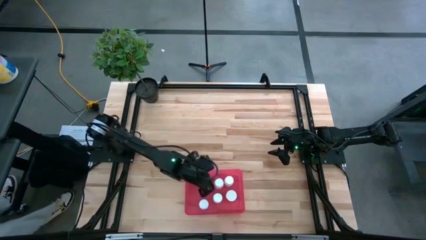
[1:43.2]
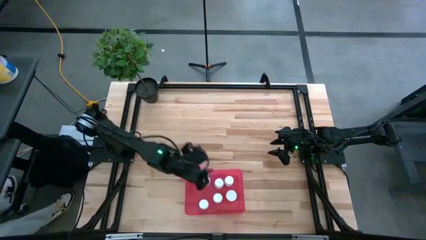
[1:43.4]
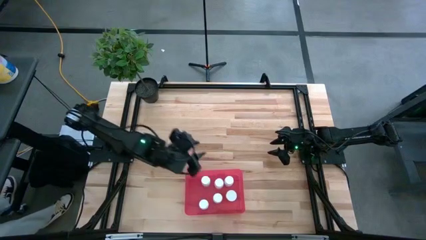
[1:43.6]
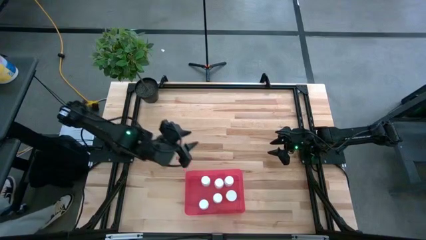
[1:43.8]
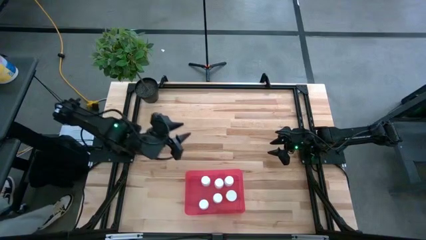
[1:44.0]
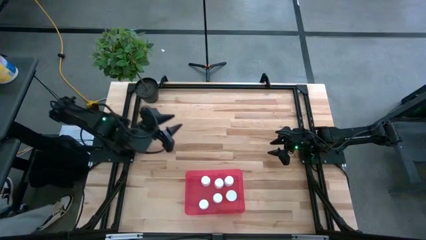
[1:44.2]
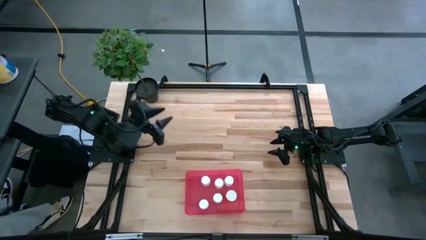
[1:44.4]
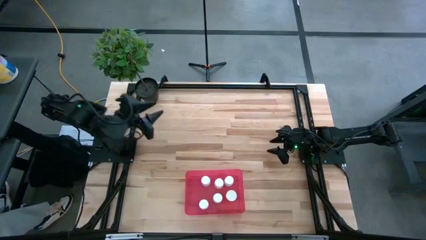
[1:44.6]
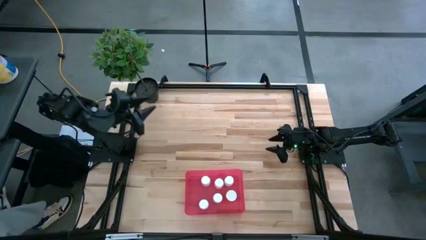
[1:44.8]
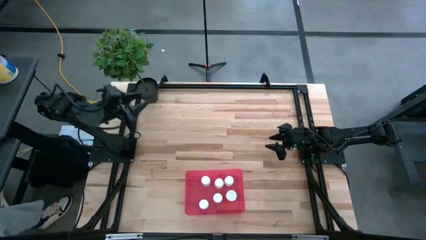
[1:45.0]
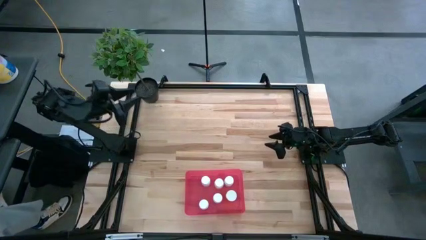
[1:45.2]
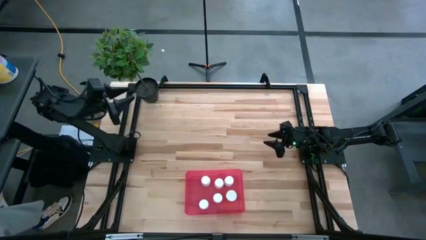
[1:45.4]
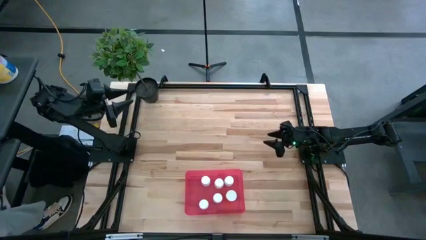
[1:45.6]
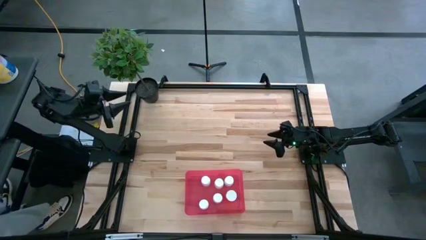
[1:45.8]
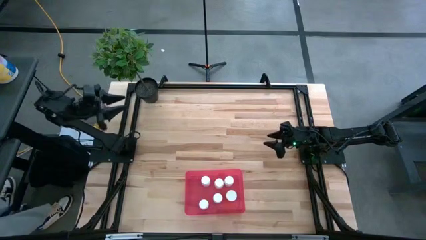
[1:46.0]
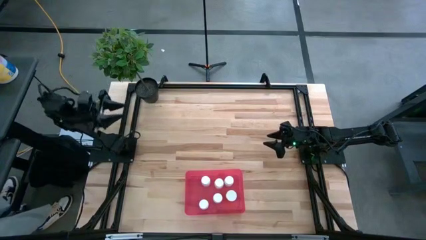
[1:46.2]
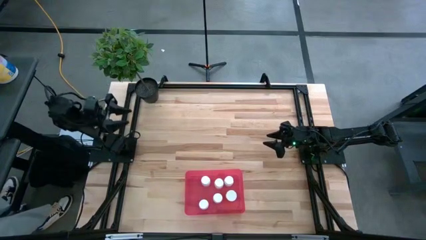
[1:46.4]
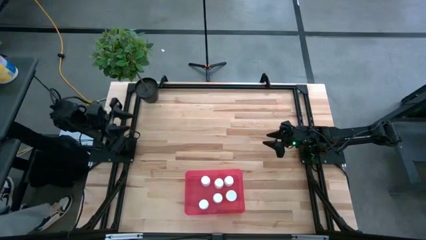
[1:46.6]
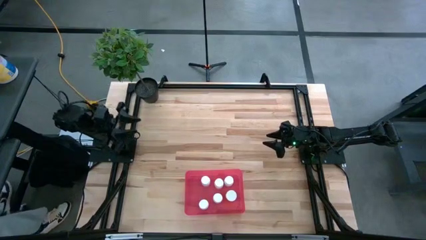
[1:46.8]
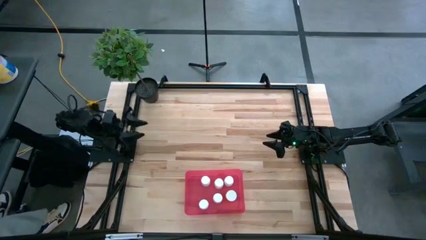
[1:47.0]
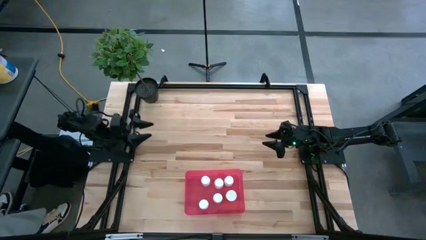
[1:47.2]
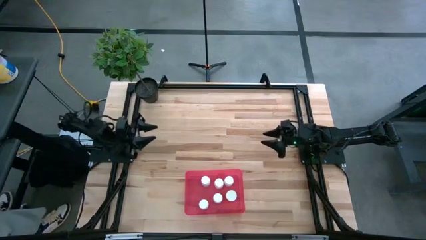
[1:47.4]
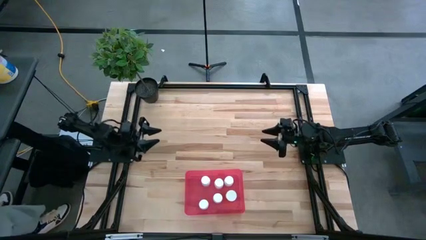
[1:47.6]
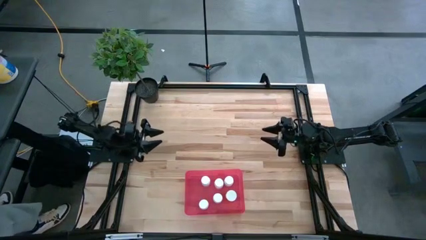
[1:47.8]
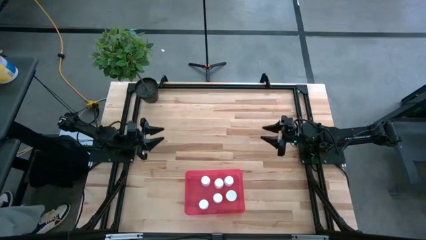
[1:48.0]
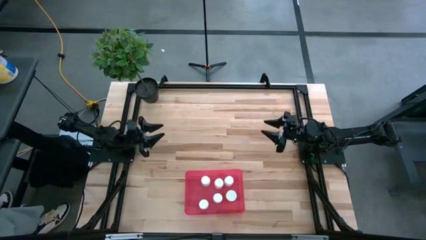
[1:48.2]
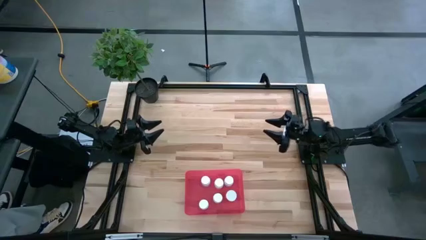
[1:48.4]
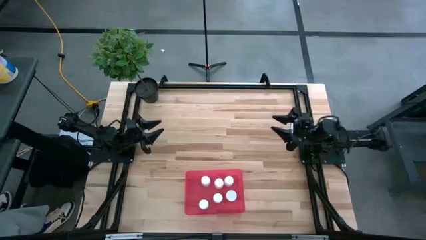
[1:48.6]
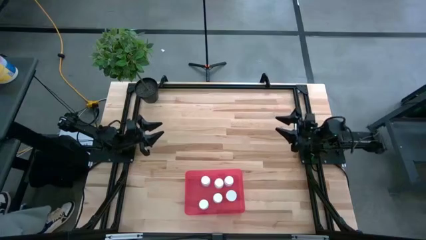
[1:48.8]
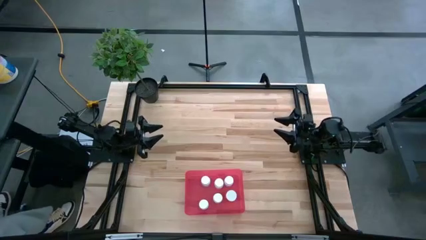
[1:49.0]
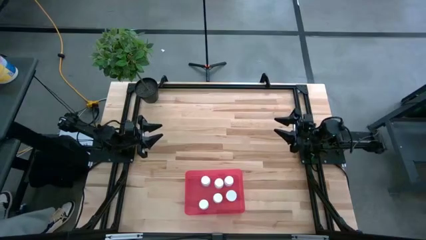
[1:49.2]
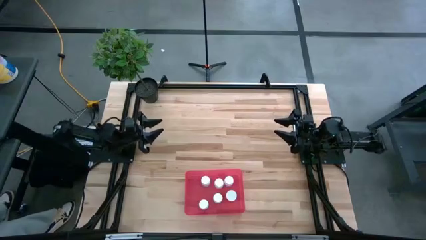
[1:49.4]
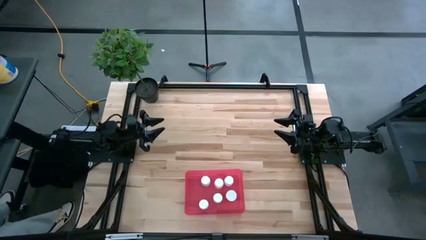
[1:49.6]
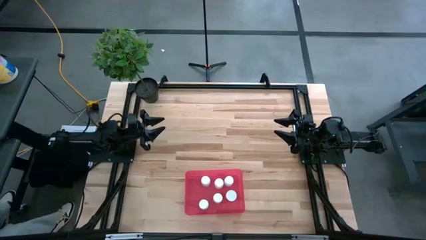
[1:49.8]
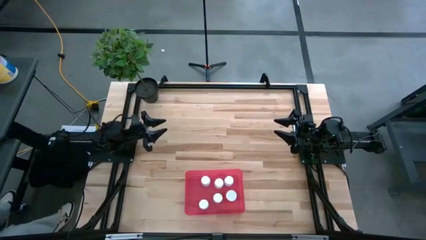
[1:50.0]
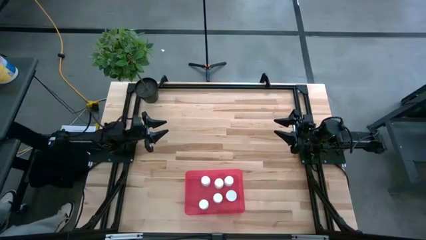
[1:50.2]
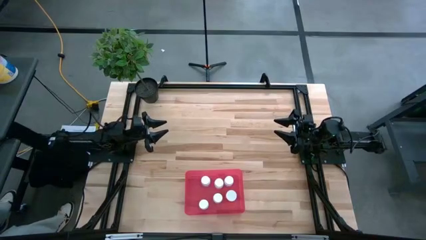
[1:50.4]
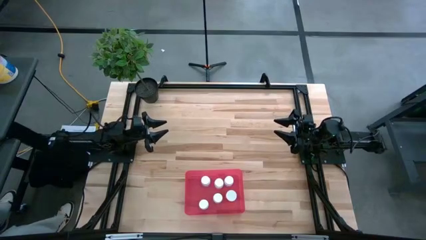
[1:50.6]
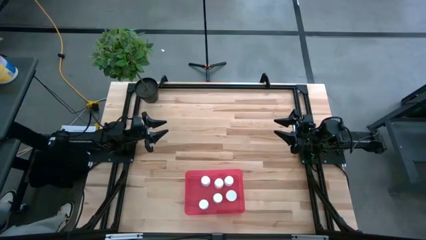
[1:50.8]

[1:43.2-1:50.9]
Task: Pick and place pill bottles into a basket
Return to Home Position

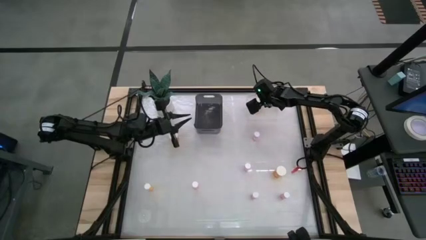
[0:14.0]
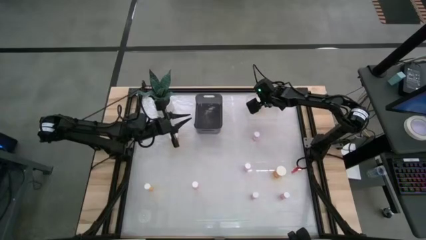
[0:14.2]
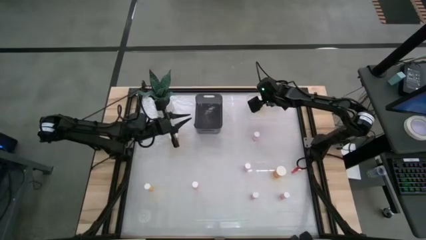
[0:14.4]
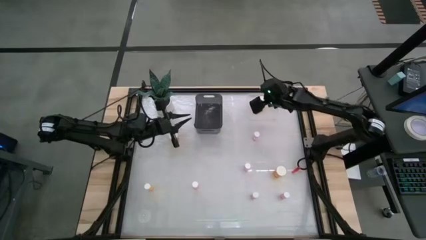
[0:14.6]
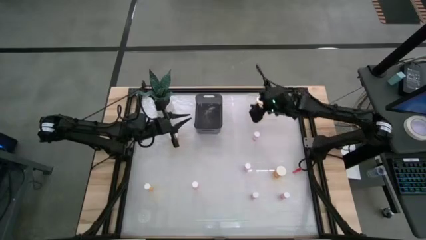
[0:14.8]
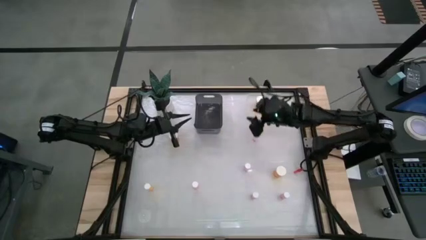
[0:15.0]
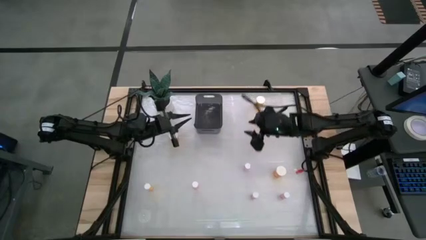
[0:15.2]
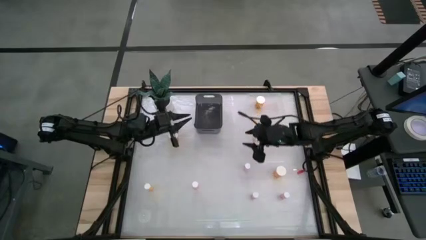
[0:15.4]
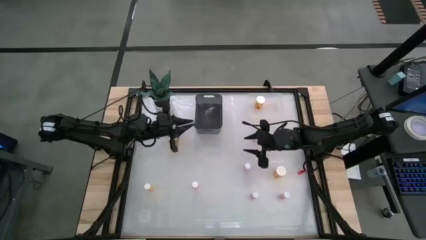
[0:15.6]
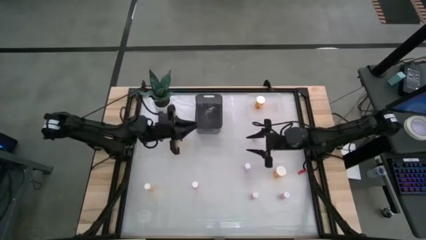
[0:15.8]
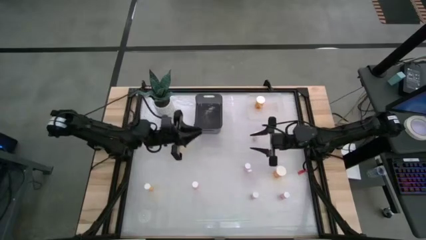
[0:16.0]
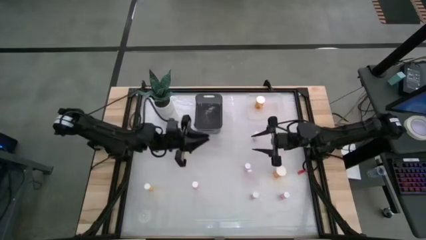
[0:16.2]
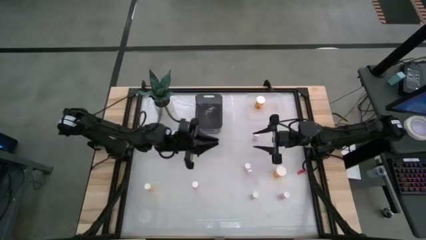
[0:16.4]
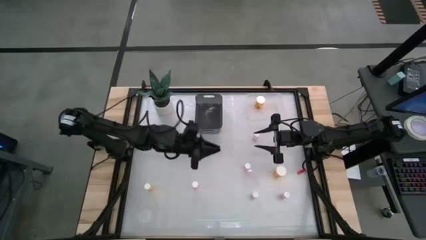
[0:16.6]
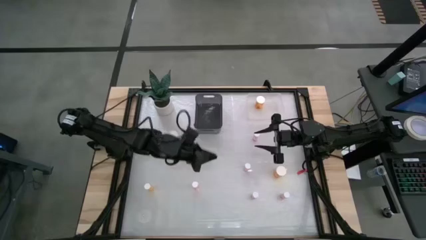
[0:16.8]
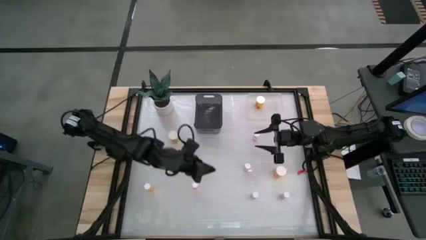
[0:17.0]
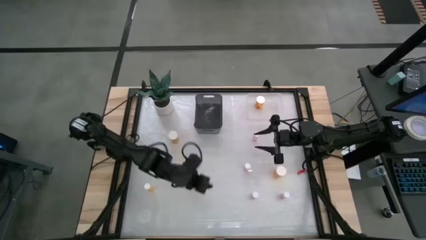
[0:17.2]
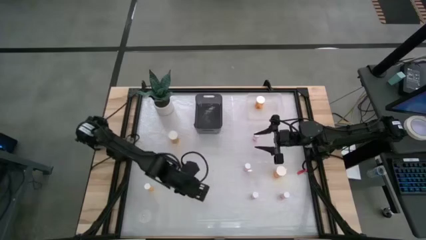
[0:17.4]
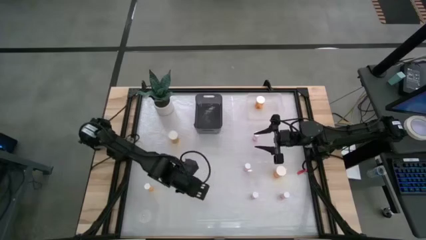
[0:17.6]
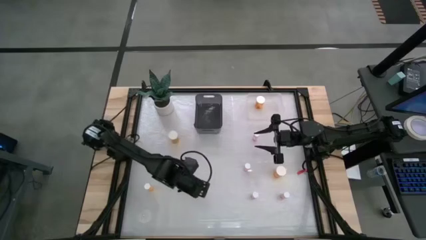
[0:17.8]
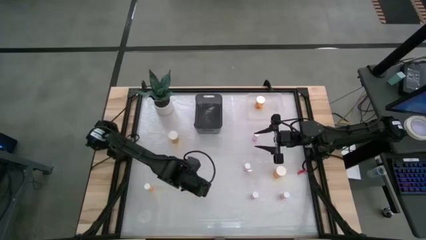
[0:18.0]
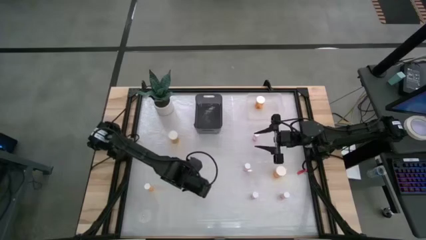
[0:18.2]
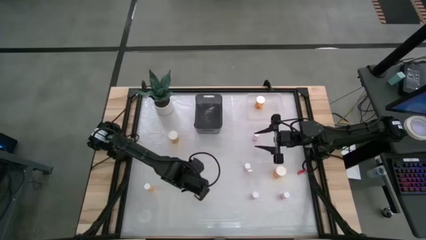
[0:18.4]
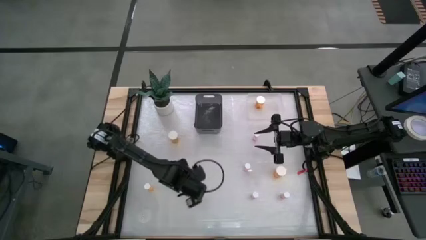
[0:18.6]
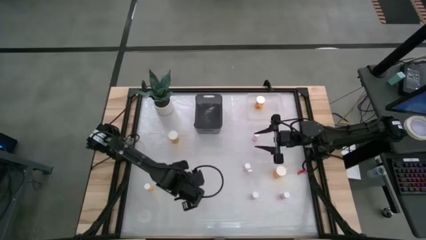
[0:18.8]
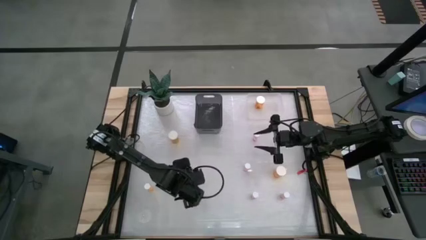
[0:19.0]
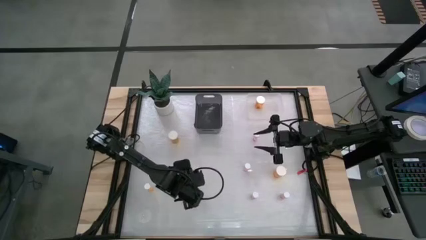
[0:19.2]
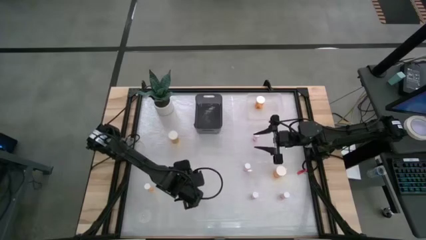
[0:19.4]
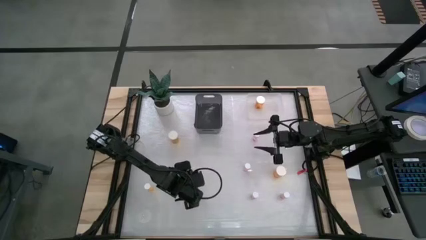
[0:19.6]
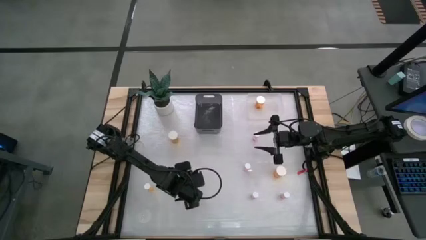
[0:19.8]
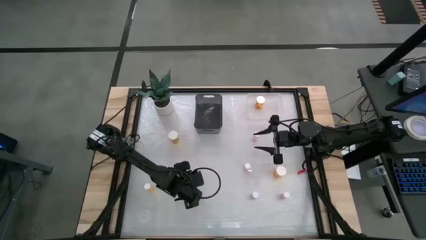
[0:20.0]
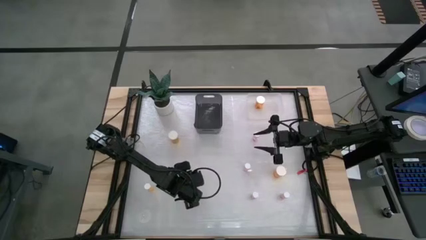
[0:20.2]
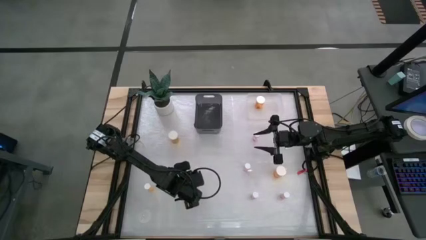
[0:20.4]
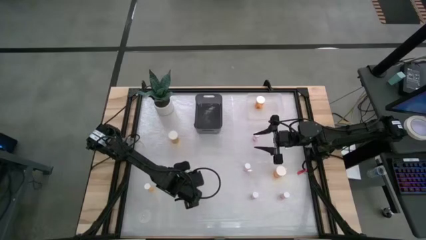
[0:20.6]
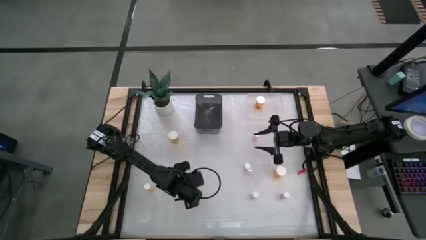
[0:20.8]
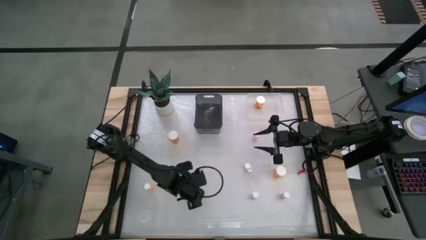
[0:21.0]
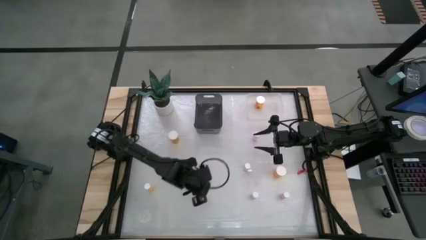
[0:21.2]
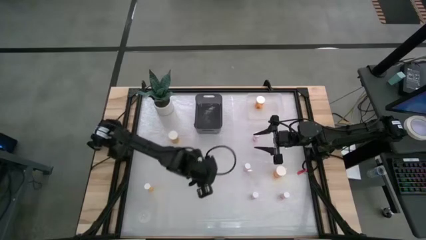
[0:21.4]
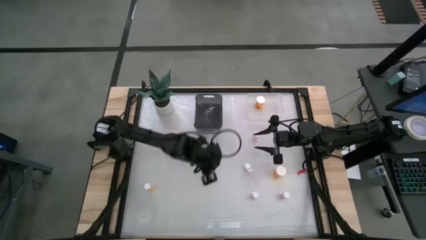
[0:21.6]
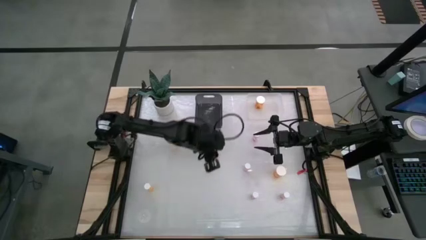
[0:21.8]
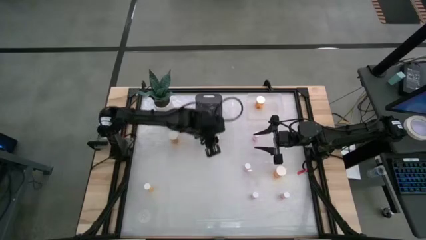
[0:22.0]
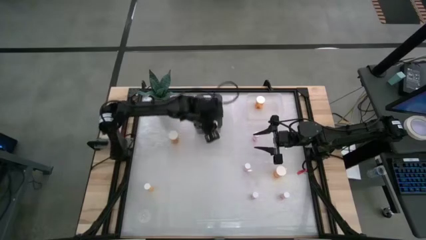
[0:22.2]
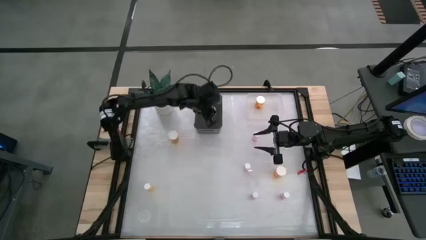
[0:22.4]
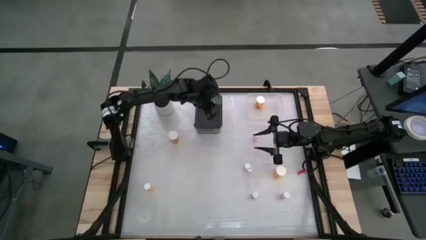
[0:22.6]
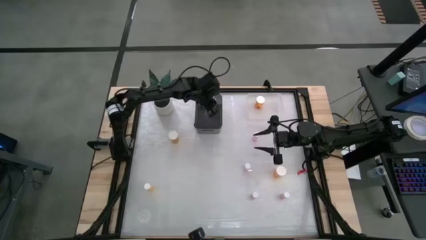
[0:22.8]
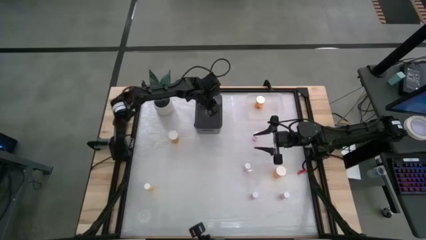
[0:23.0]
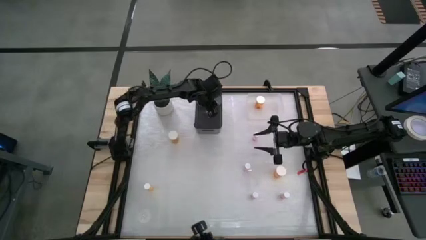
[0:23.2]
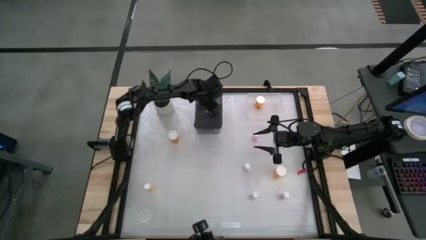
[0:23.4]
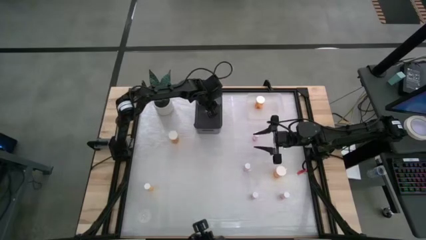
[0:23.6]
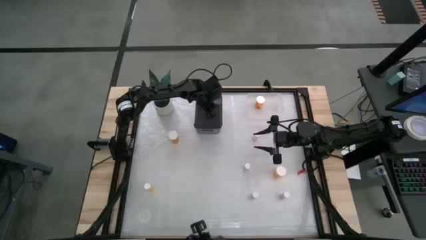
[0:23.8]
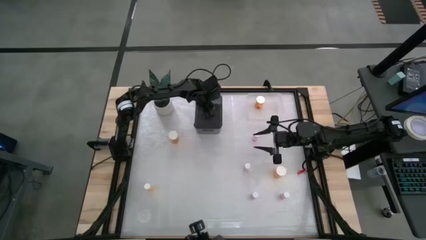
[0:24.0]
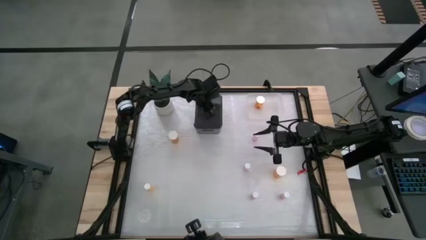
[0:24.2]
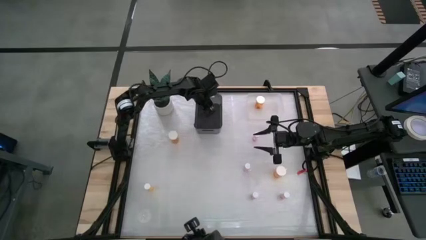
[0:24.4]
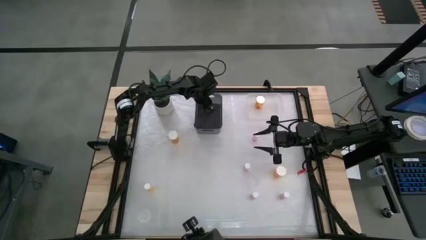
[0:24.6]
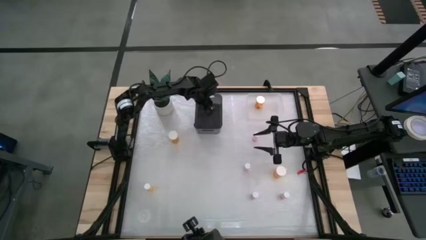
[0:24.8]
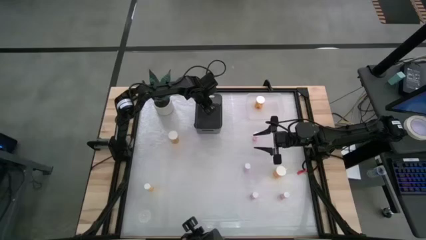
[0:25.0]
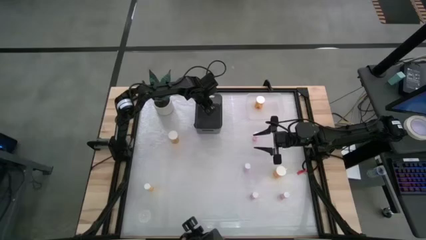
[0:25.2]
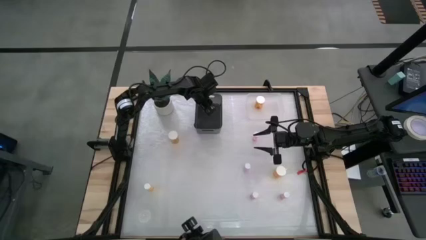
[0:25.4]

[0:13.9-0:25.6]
Task: Pick and place medicine bottles into bin by pill shape (circle, oval)
Put the small pink pill bottle into the black bin
